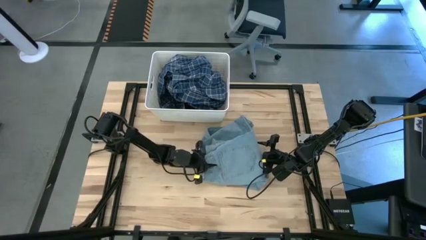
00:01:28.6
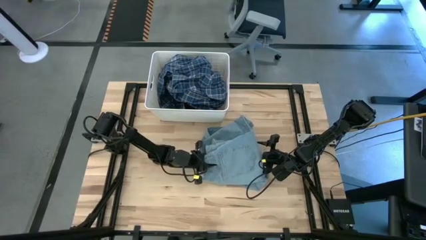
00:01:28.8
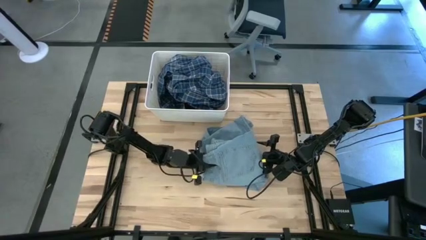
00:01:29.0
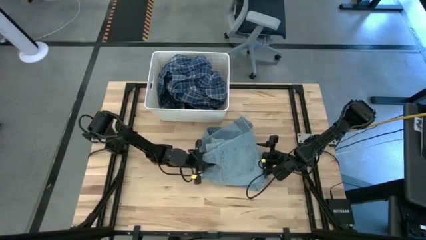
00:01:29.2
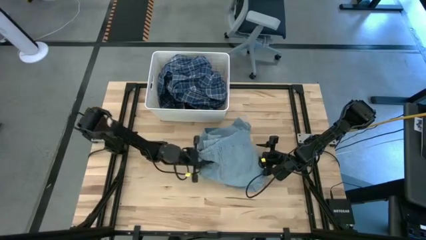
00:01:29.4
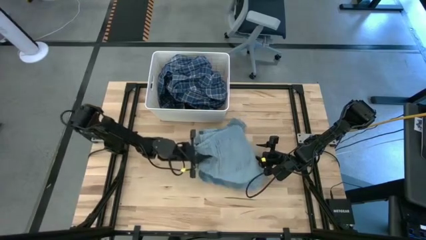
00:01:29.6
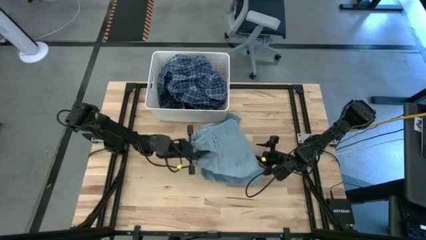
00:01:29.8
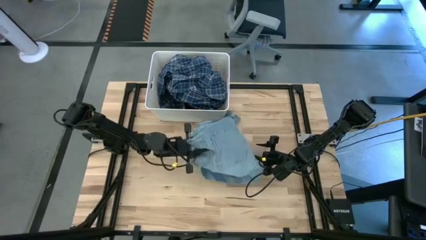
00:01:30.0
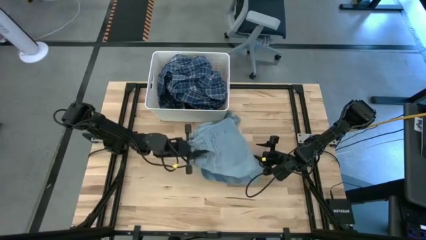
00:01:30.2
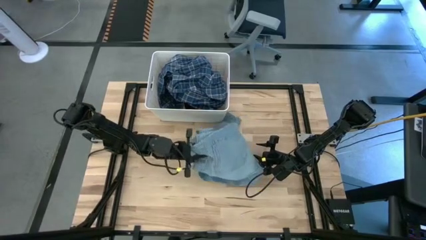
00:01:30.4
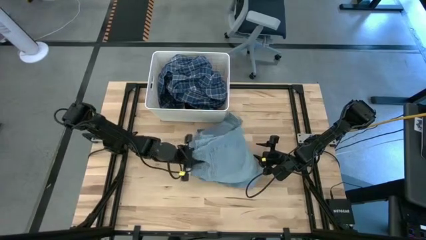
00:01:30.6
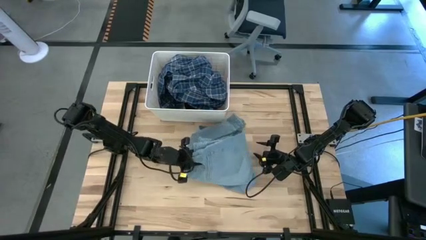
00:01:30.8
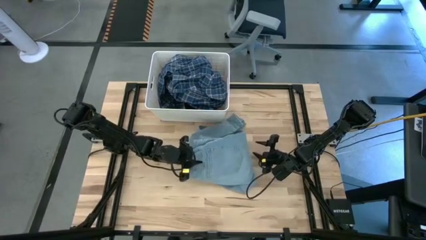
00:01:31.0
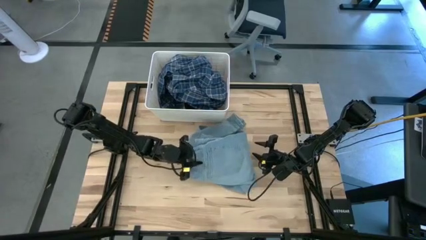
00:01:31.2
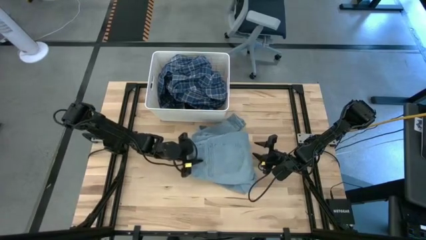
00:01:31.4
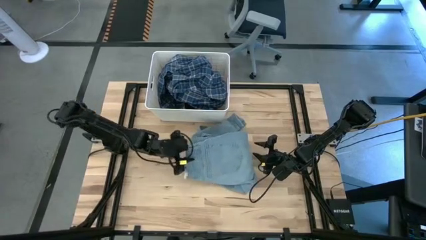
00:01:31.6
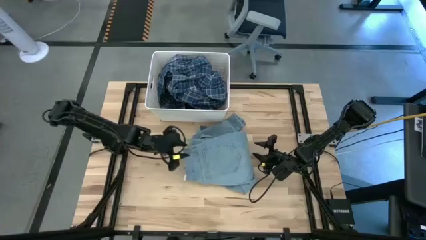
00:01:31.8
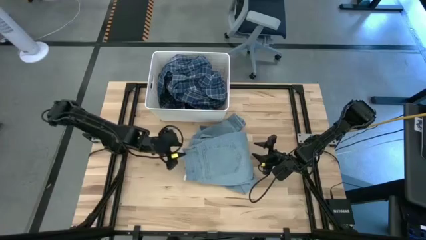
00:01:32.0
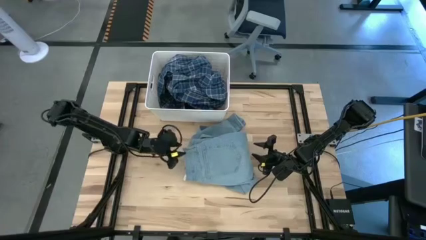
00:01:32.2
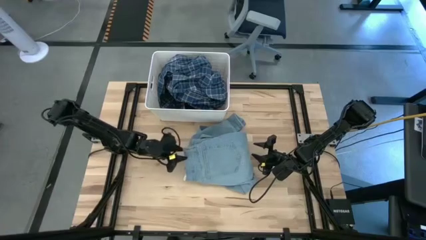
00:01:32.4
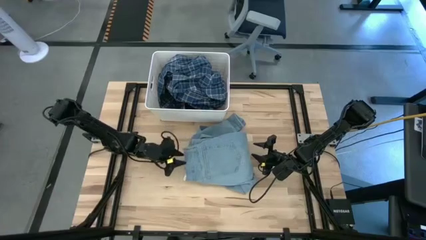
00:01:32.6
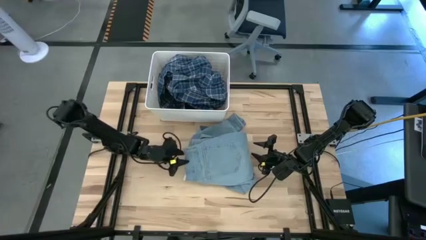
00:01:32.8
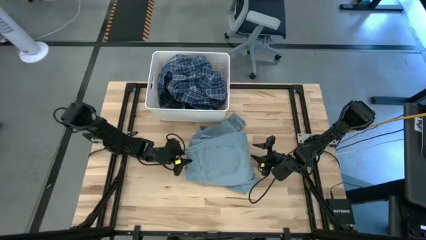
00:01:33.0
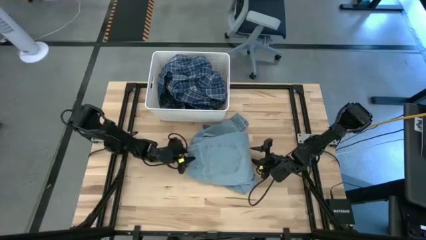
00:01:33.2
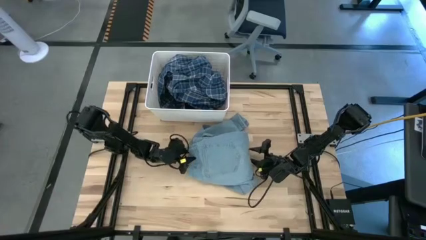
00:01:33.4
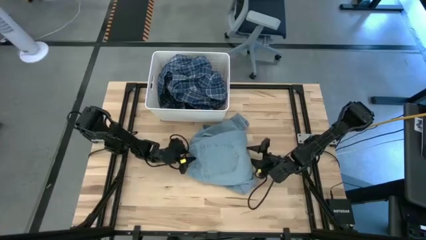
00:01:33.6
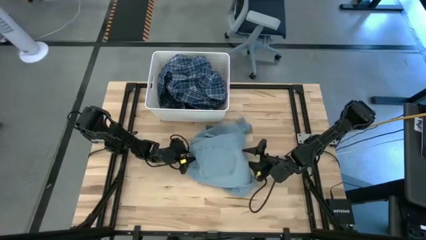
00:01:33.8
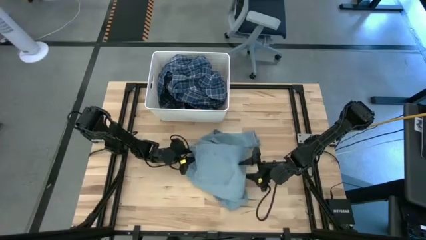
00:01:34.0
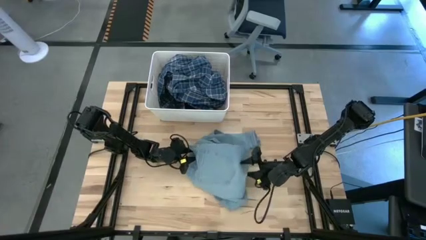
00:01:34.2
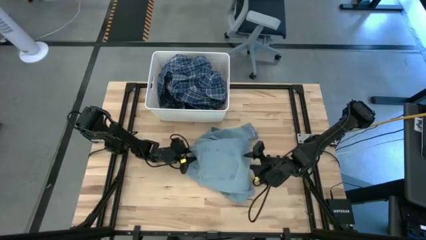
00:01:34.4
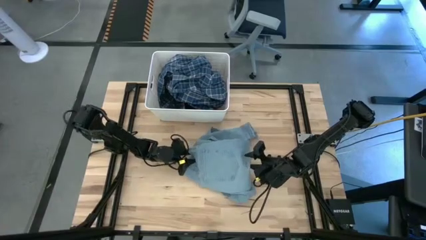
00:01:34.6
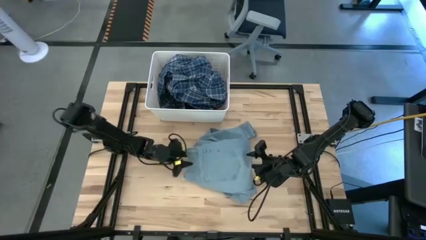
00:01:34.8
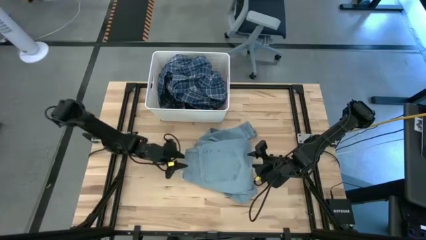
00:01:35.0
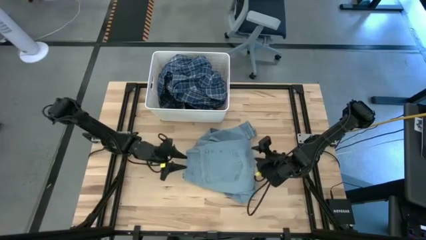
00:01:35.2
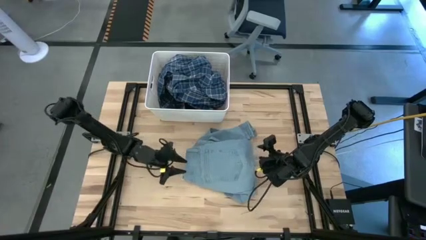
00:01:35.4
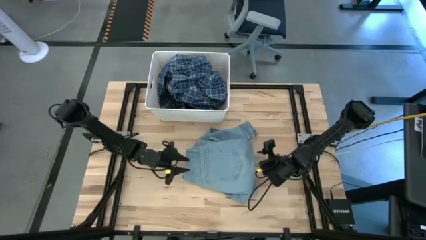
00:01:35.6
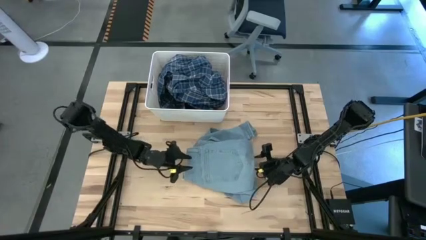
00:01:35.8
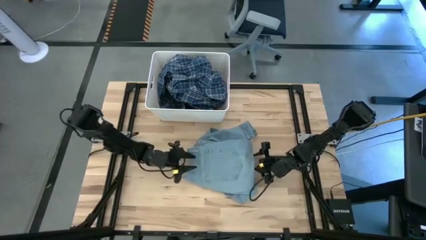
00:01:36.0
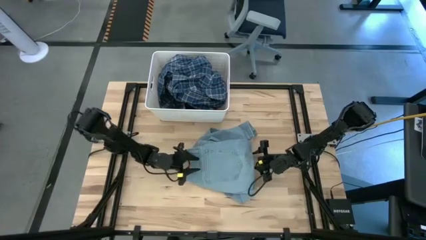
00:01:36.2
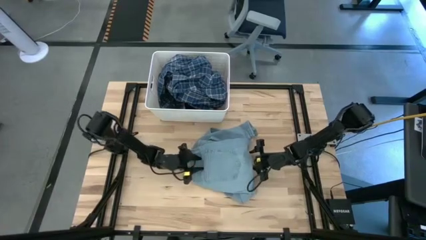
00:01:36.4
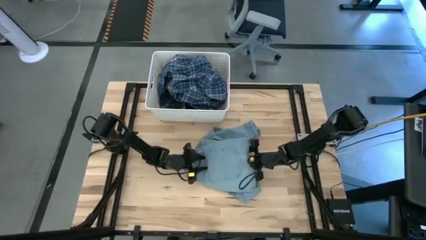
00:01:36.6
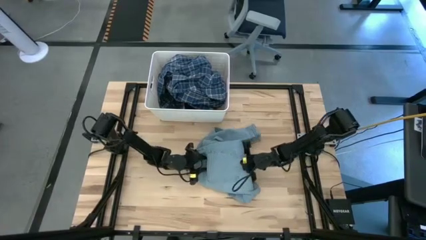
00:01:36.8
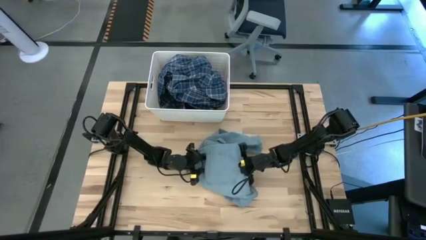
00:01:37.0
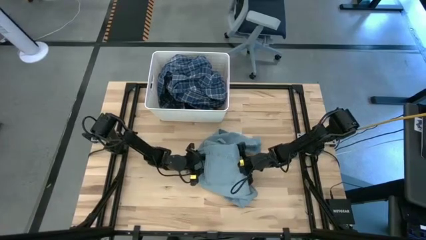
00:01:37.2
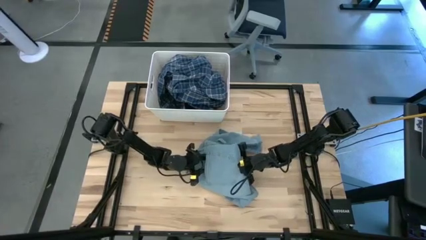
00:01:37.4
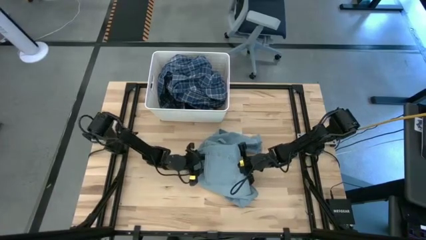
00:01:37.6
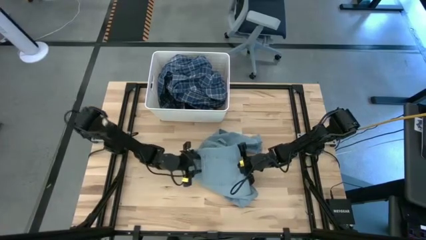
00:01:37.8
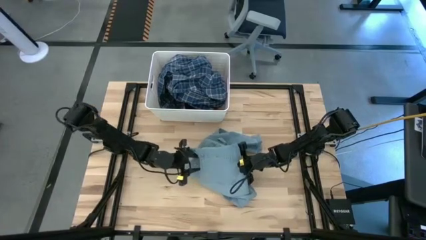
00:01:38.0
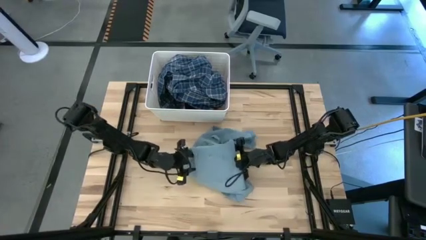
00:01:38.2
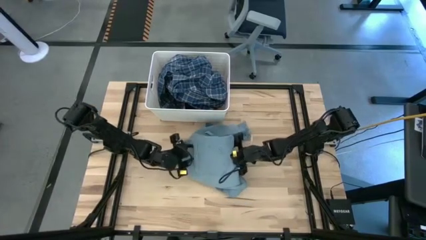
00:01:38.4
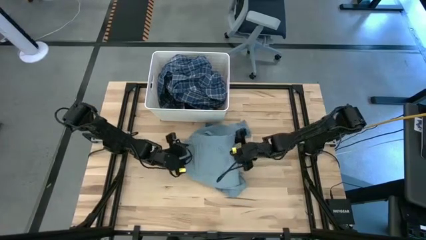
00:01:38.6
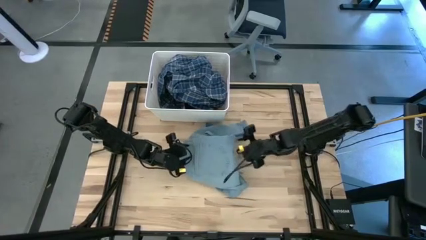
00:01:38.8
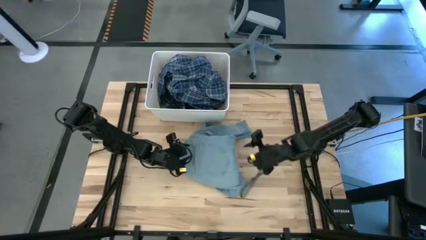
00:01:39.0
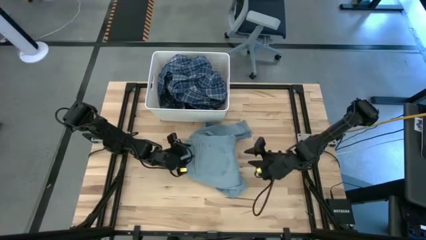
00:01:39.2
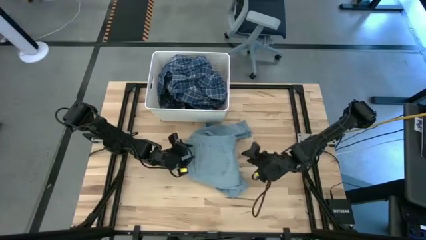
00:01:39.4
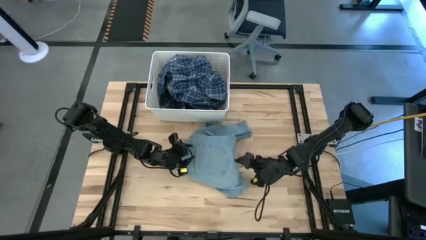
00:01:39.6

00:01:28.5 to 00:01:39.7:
Task: Sort clothes
Put the blue pants into the white bin

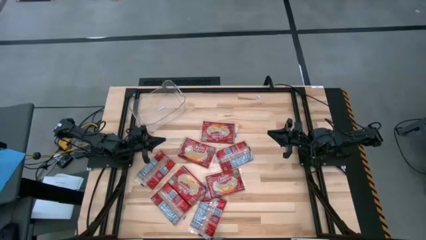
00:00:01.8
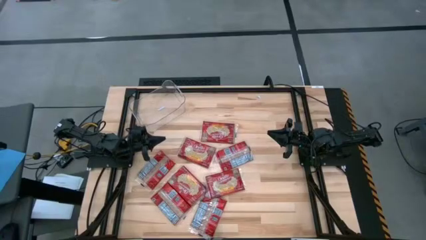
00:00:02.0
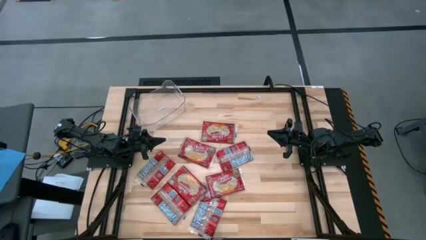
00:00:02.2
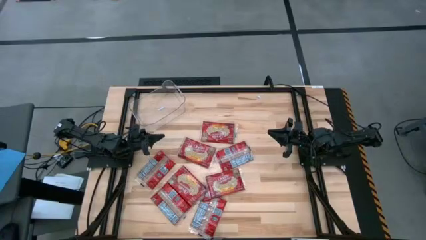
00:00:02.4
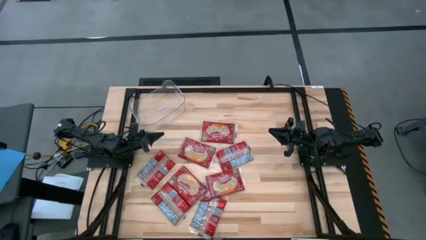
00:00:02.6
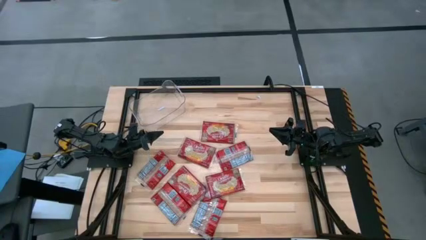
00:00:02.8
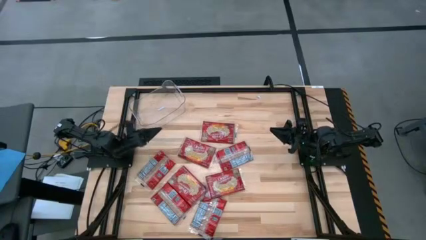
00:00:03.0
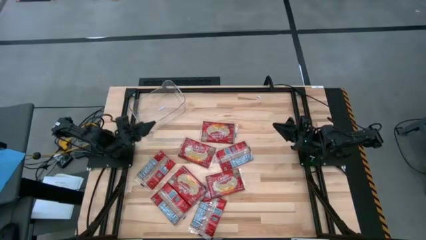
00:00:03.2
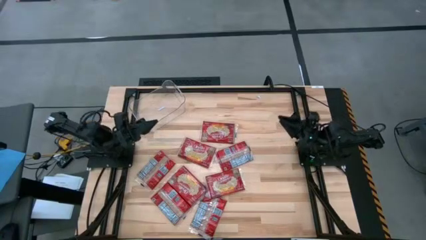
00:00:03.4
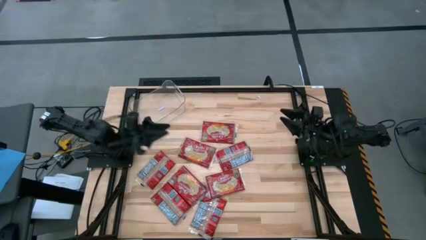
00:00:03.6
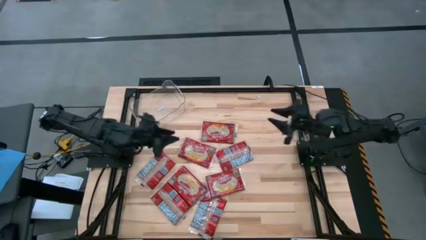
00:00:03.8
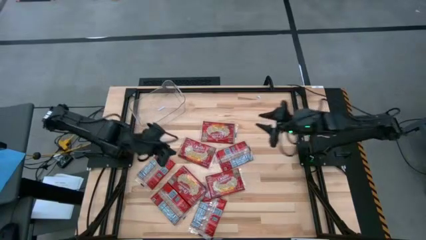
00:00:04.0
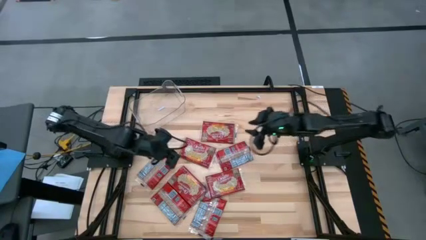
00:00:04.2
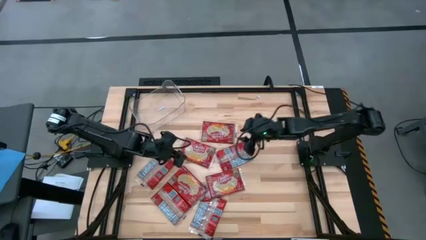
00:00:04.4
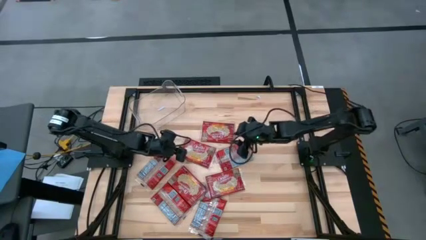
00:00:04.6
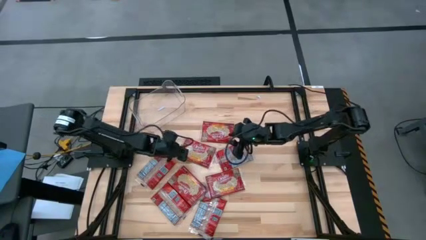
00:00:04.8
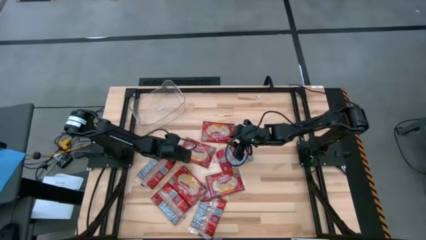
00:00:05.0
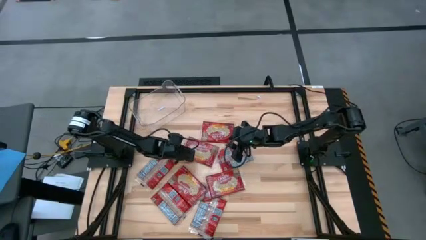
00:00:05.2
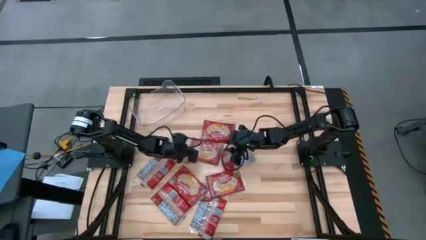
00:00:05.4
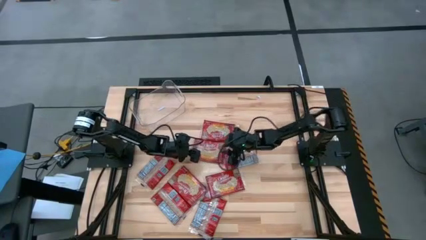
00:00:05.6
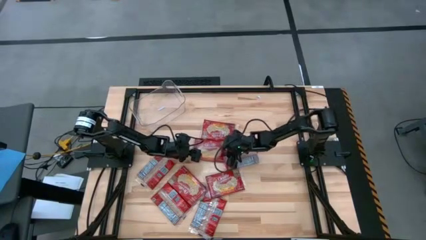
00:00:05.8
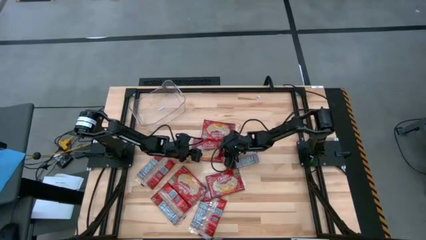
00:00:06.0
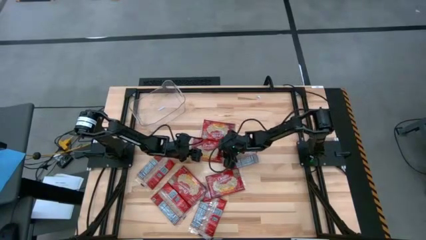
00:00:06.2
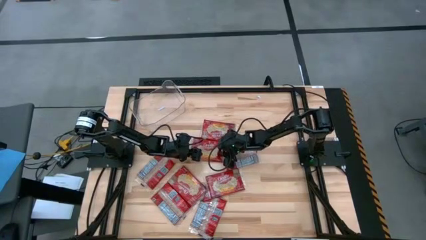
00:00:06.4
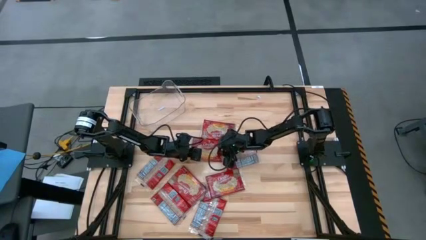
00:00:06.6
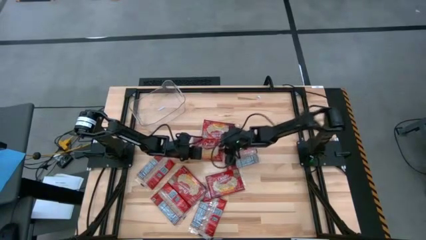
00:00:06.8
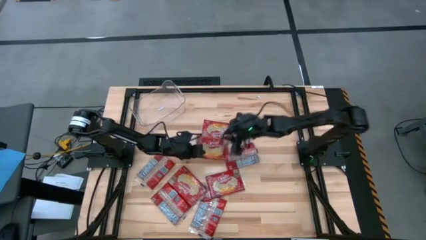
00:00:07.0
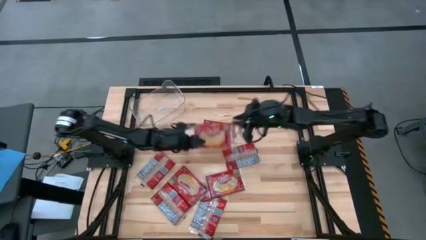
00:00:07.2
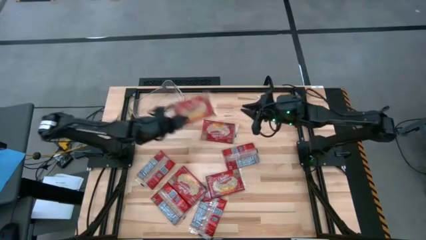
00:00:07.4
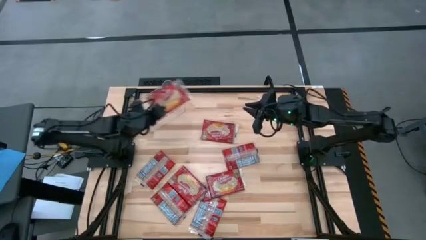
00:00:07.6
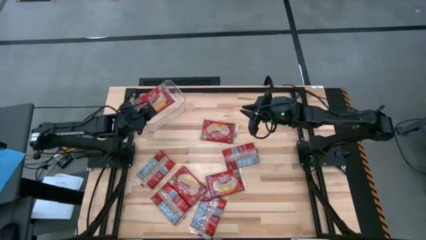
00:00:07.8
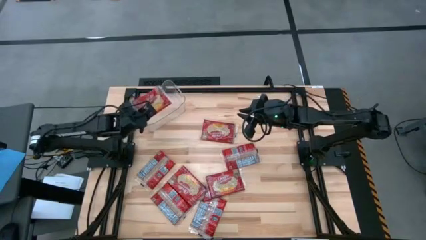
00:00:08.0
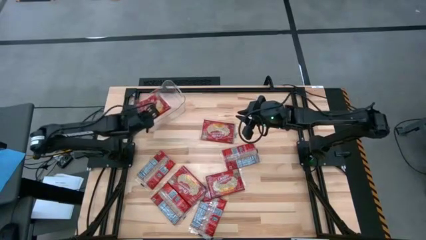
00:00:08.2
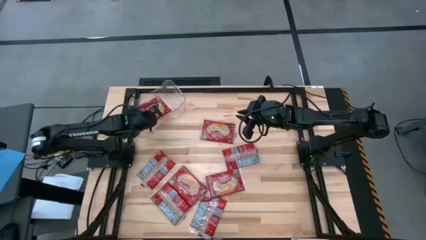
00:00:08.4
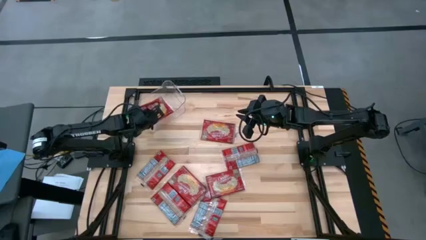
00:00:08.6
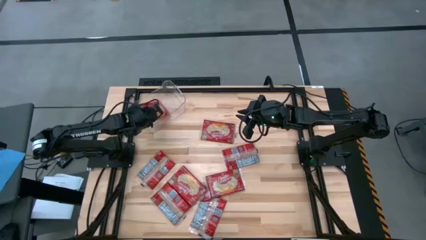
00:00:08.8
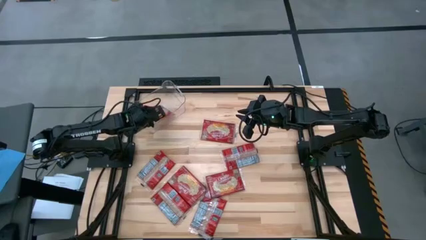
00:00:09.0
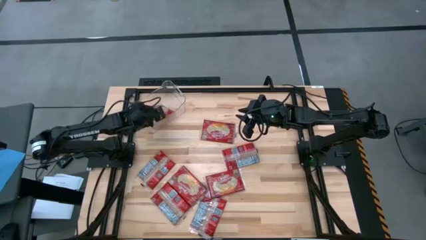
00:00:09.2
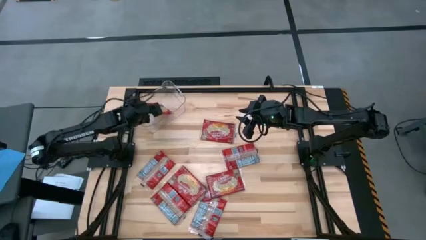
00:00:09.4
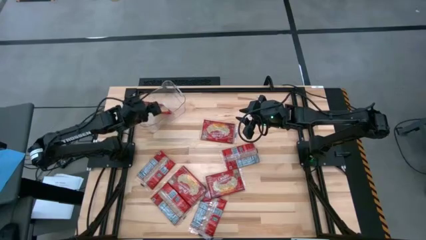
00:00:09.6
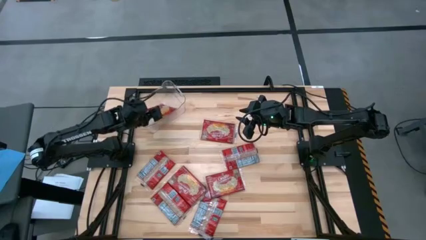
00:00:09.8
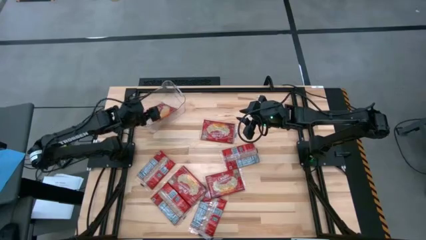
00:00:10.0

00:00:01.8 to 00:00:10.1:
Task: Sort popcorn bags into baskets
Put the red popcorn bag into the transparent bin
